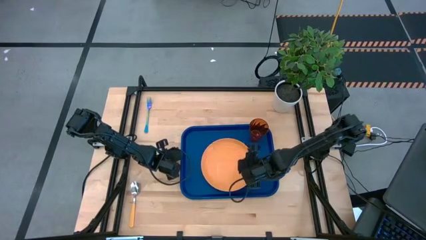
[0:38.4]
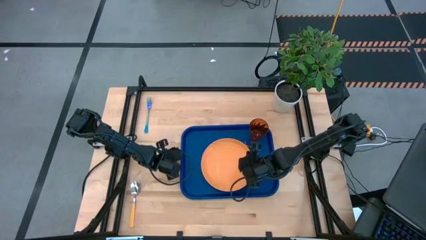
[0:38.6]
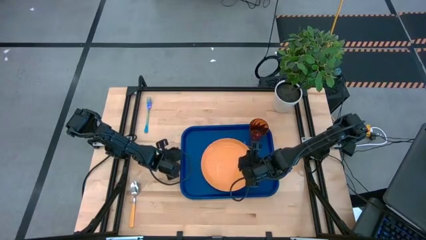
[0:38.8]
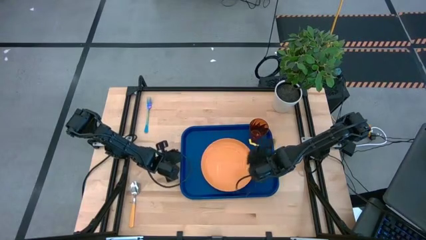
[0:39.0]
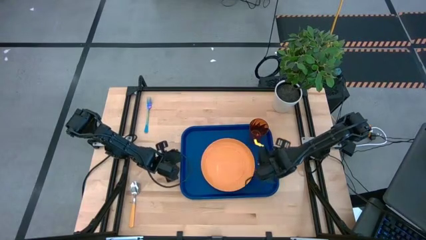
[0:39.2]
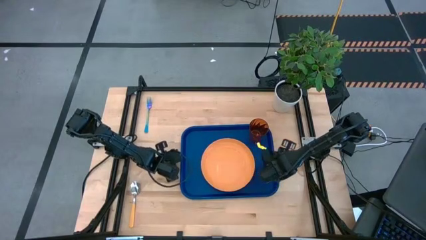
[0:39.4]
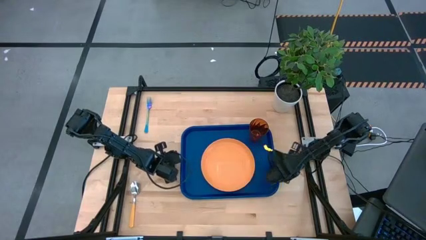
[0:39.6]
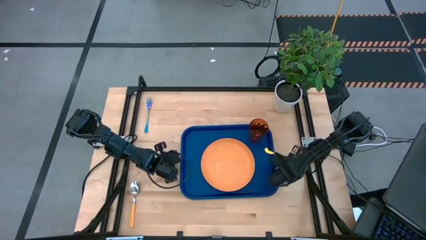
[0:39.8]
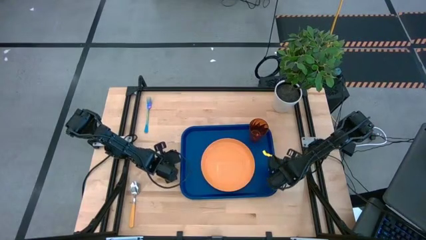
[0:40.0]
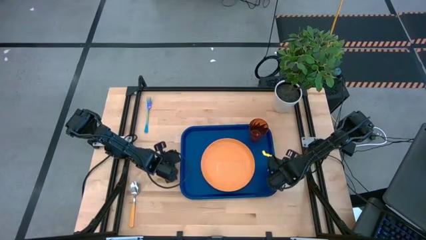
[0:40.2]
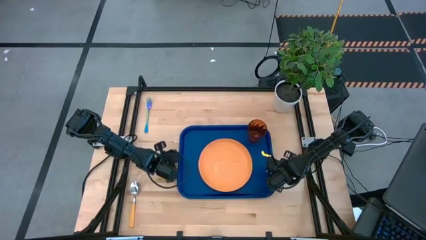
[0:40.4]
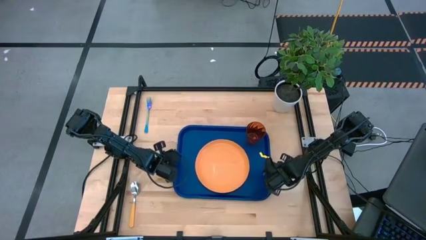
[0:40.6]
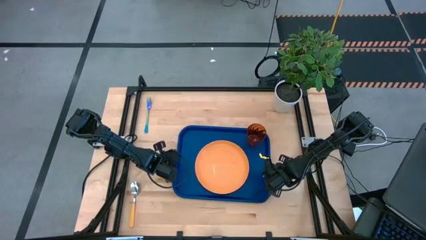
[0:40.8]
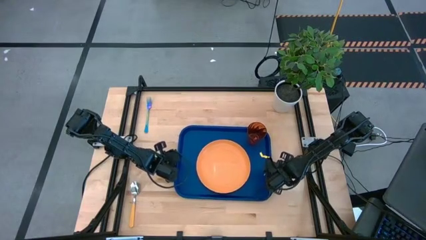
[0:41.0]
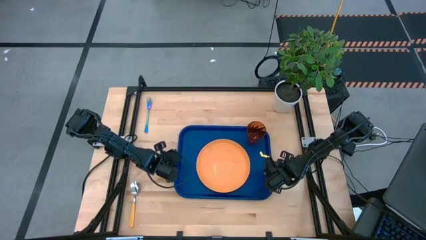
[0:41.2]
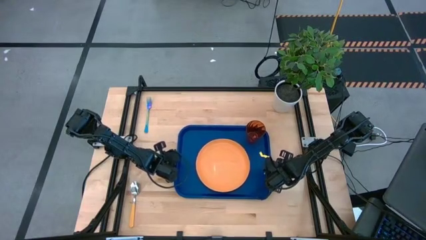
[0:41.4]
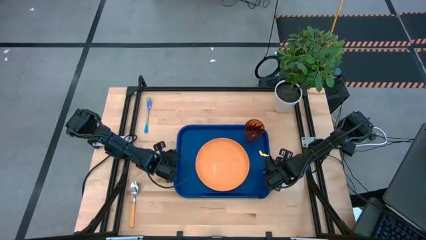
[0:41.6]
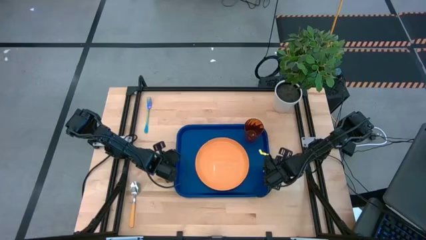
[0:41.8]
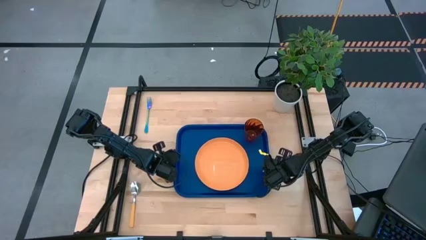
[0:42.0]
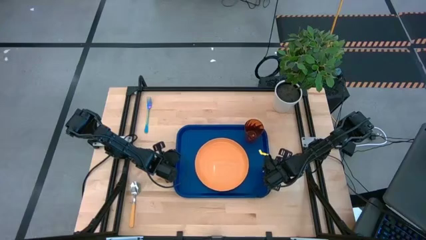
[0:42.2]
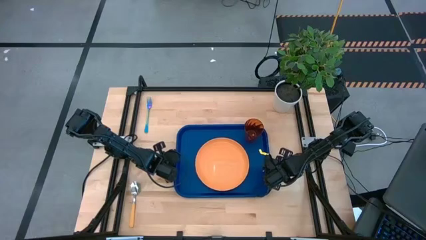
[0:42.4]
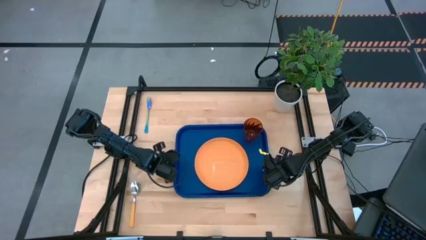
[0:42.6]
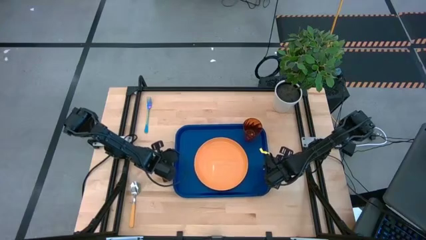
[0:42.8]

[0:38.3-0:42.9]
Task: Pick and place plate/cup/fork/spoon on tray
Adjust the blue tray

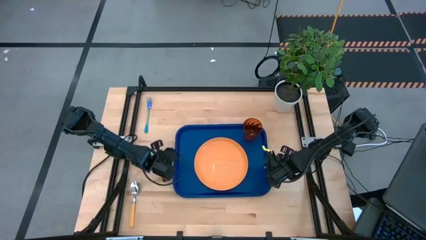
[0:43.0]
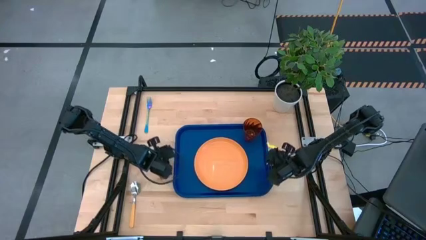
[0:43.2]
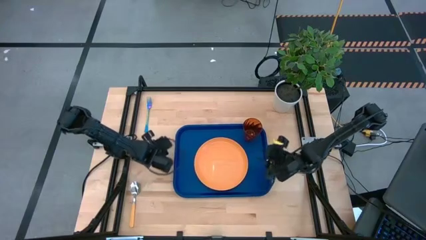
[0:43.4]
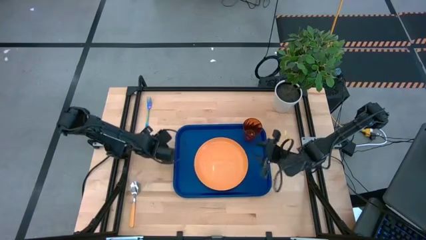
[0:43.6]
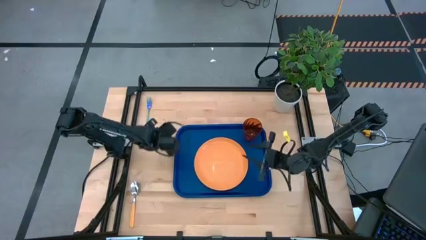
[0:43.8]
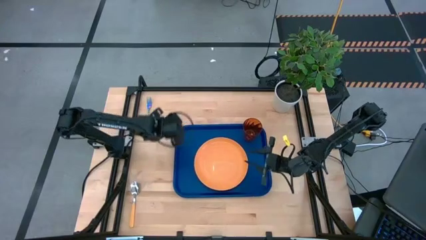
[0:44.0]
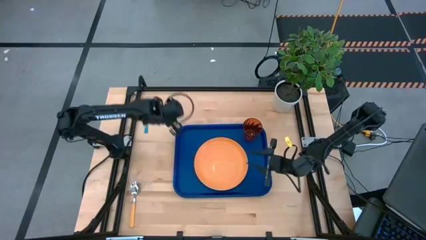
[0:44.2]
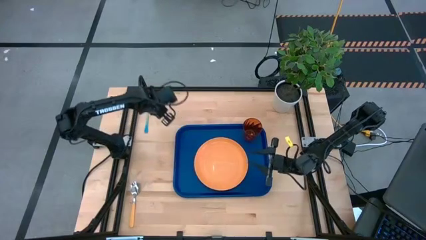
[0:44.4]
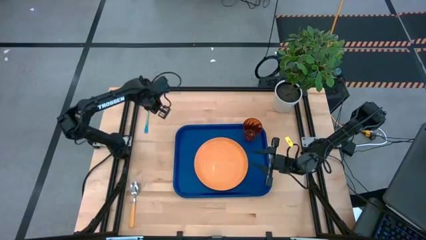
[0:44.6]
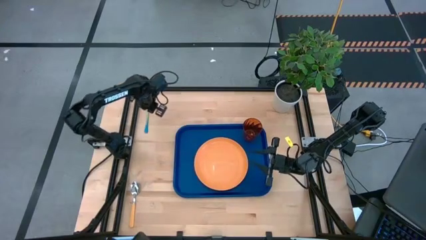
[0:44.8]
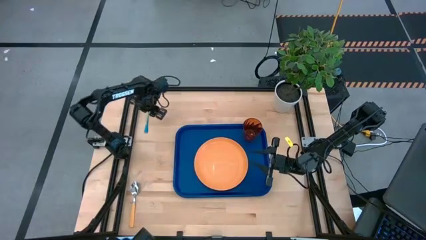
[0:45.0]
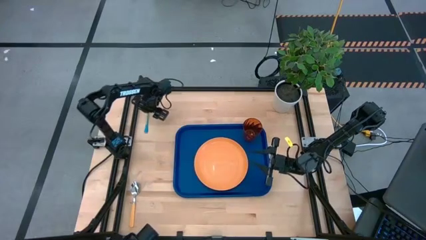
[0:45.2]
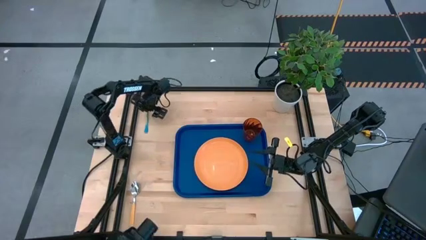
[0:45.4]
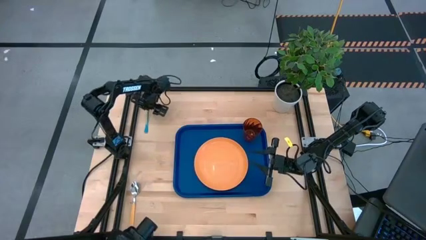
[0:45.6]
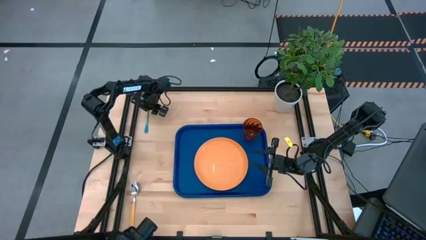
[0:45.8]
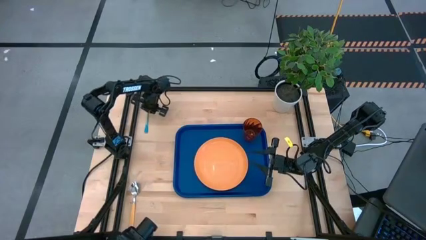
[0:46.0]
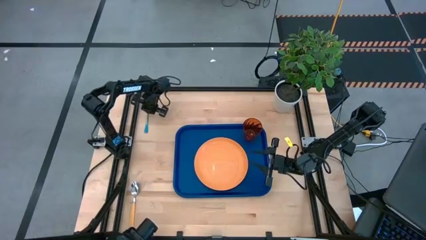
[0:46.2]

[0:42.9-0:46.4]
Put the fork to the left of the plate on the blue tray

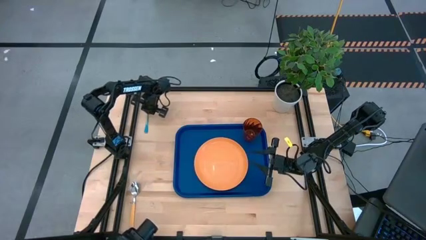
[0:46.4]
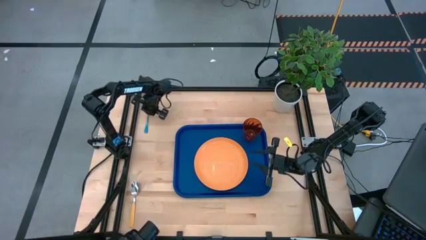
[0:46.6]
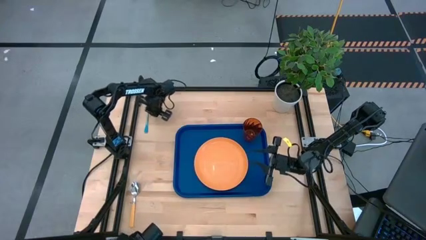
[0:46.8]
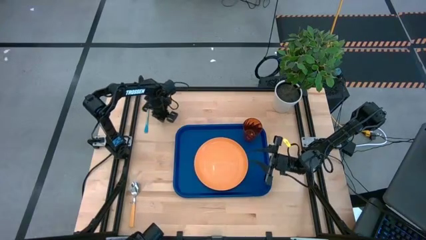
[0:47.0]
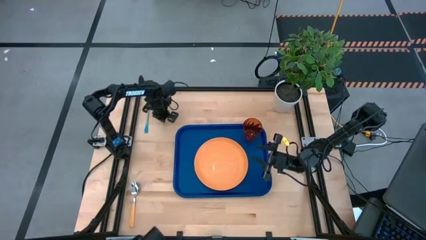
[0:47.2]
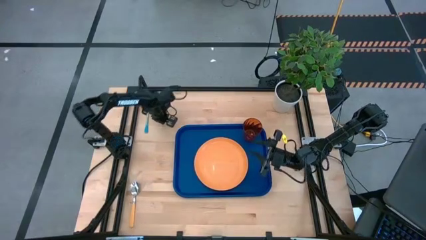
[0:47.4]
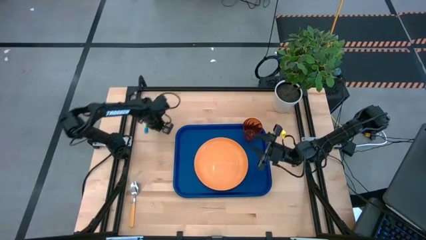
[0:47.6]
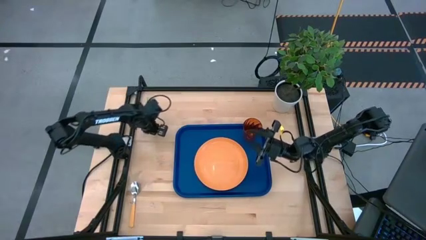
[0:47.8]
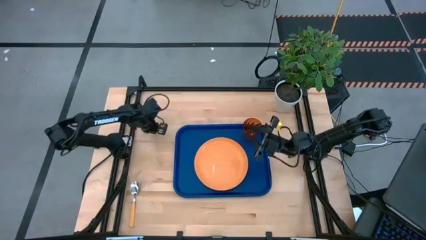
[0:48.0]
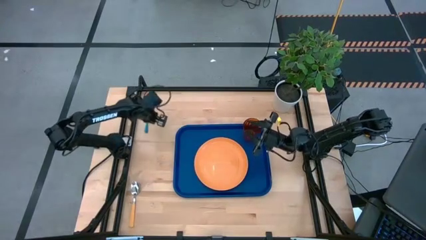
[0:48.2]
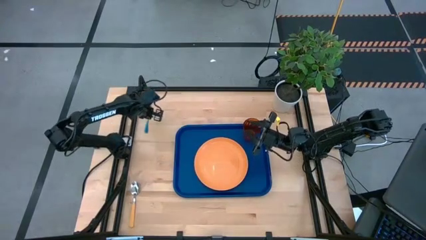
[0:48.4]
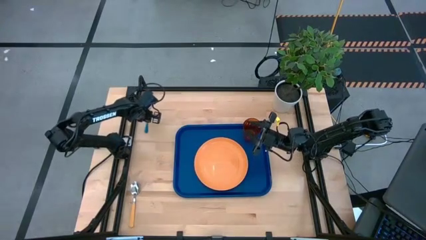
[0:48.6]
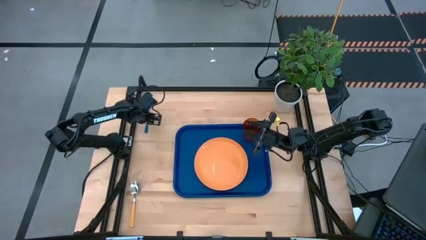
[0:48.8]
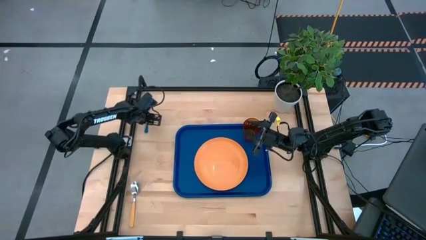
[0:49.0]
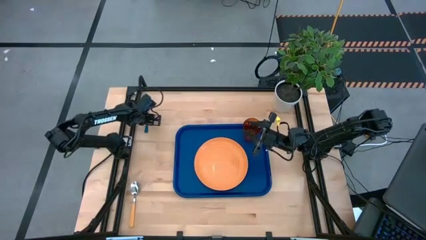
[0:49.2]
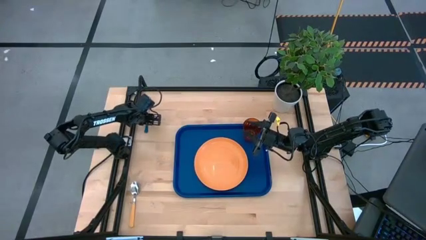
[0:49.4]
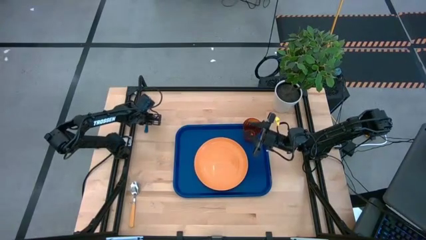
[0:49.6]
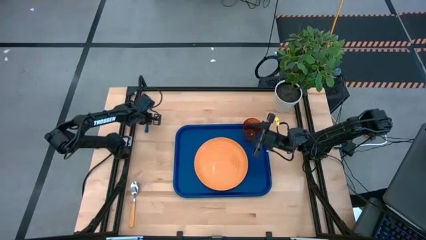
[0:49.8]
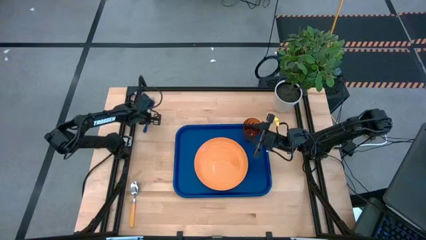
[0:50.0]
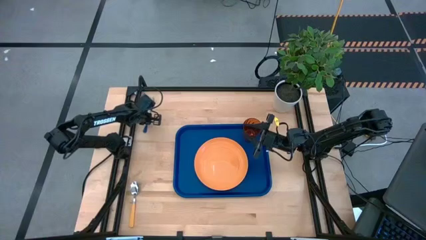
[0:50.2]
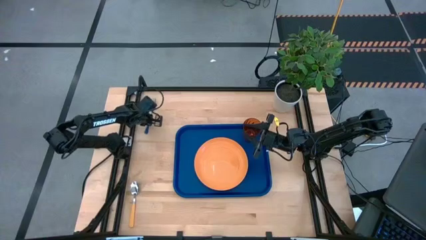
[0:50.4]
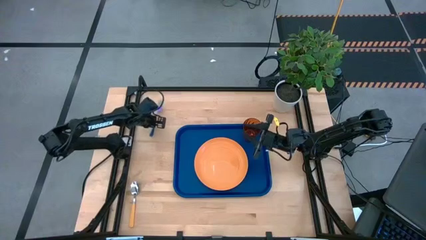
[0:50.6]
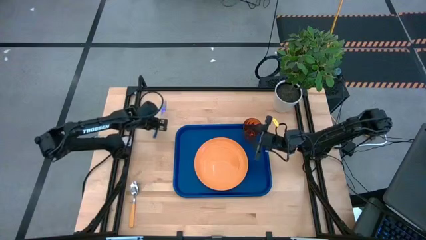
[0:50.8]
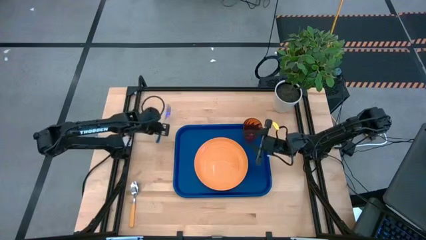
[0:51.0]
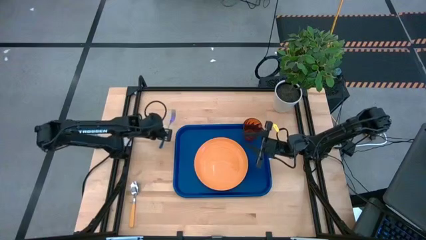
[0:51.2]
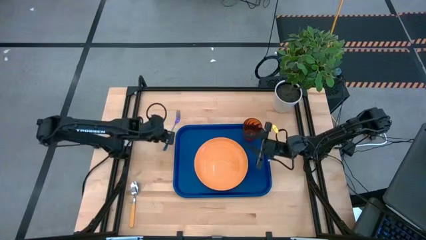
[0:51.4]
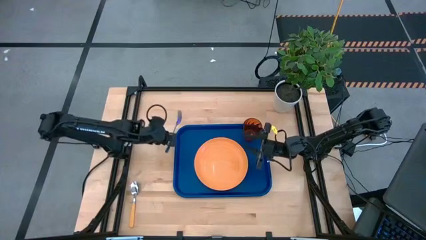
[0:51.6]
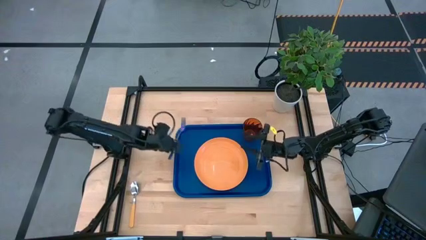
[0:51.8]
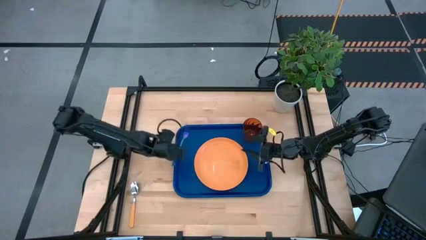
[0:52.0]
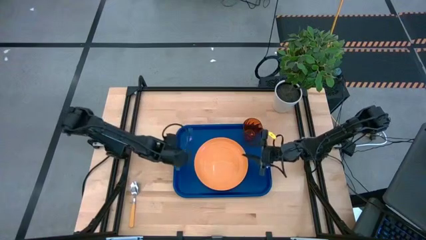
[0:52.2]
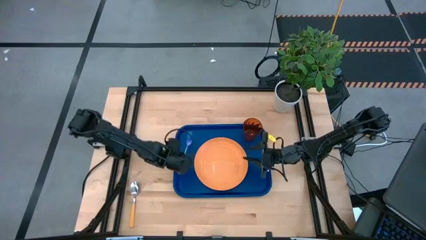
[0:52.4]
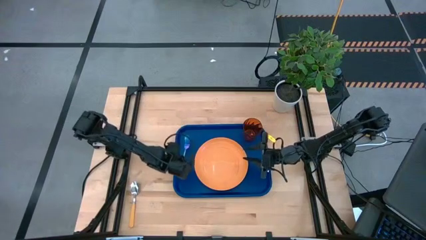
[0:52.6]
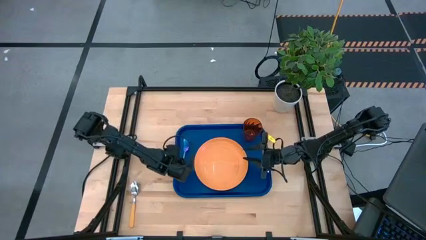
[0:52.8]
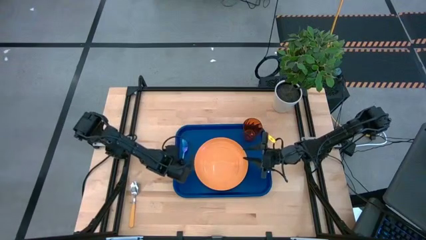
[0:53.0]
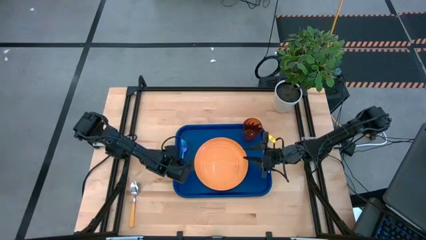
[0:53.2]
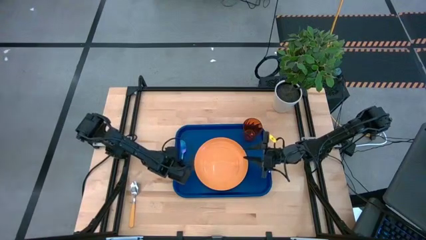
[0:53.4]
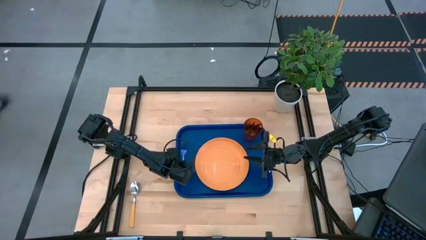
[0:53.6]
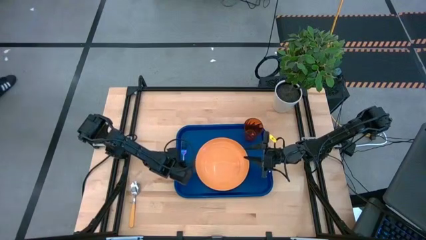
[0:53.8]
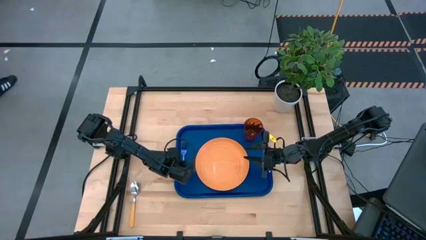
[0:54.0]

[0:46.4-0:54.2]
Put the blue fork to the left of the orange plate on the blue tray

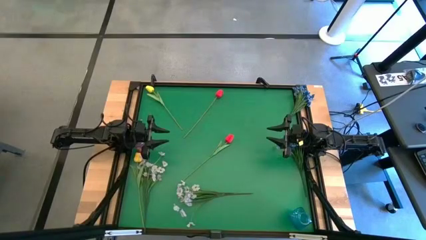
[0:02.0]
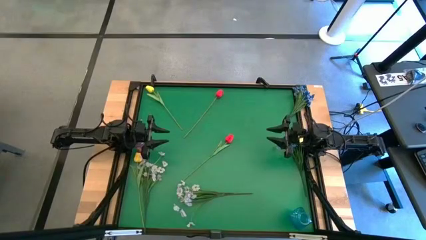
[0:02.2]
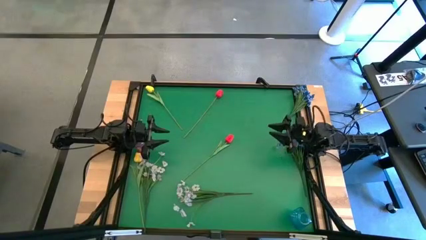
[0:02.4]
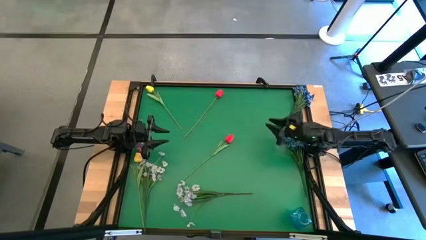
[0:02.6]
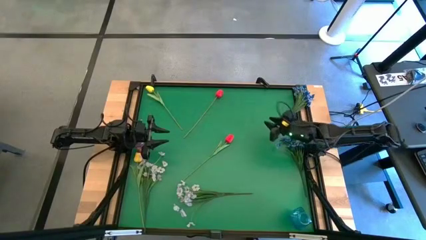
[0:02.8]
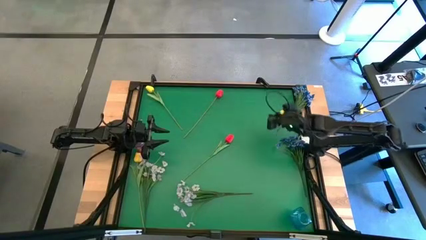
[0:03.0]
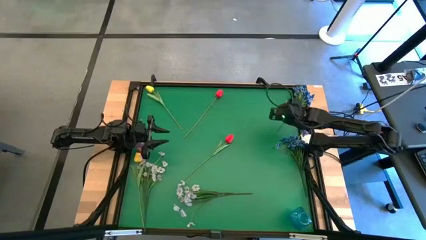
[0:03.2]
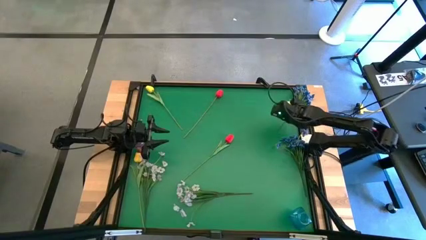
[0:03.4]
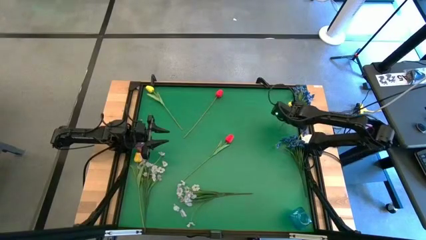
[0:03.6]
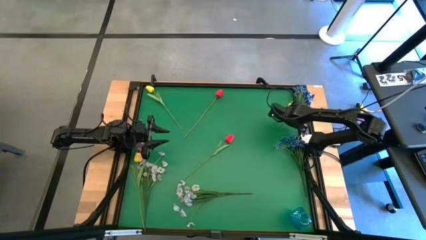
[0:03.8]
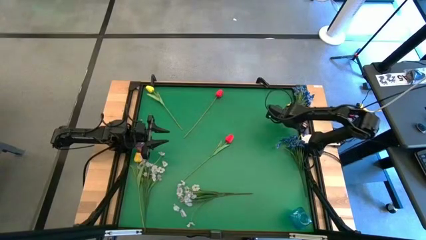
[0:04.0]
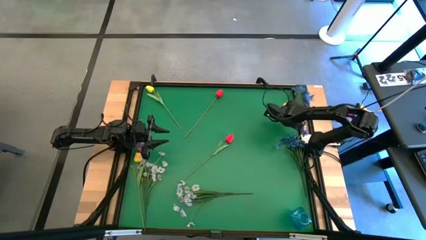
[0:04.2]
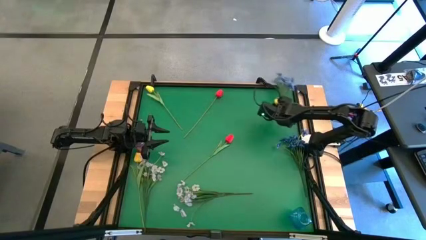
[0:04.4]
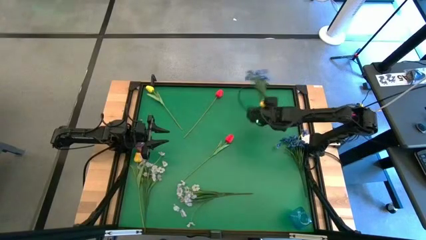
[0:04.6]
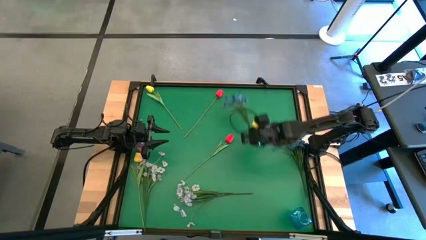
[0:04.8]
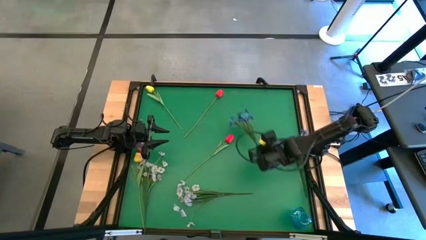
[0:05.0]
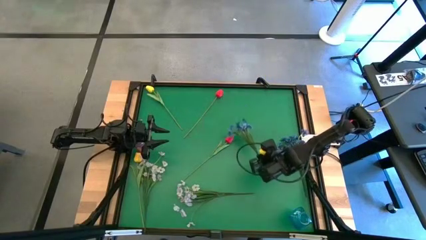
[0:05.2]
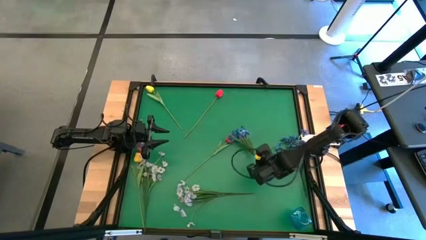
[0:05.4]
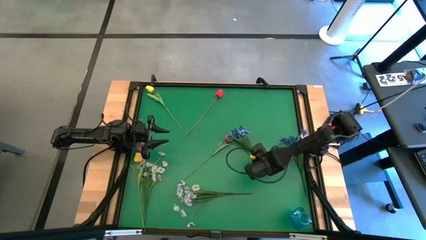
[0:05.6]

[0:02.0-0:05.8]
Task: Sort flowers into vase by color
Move the top blue flower to the center of the table
